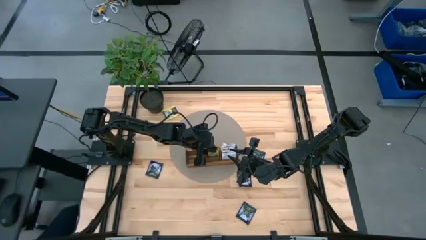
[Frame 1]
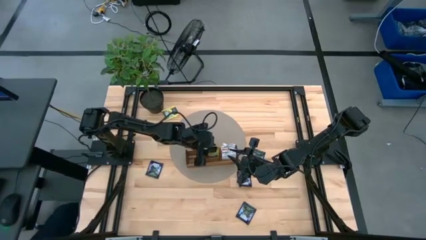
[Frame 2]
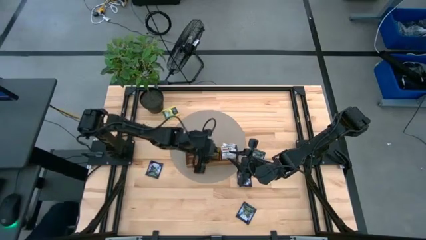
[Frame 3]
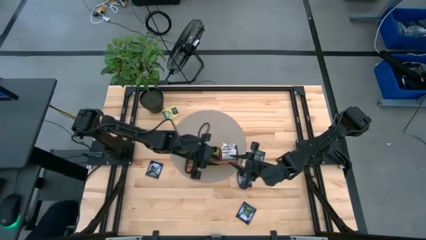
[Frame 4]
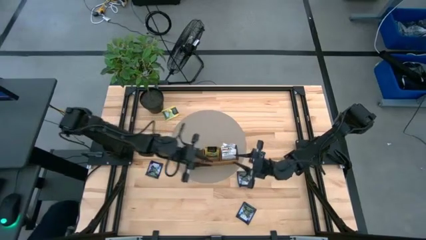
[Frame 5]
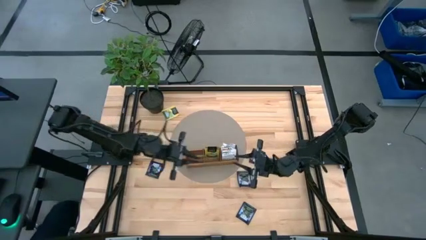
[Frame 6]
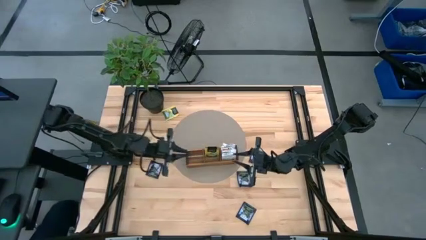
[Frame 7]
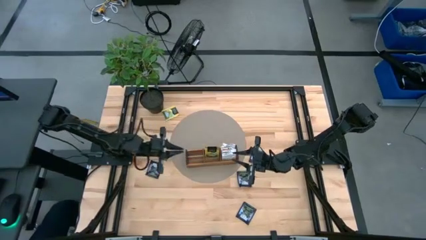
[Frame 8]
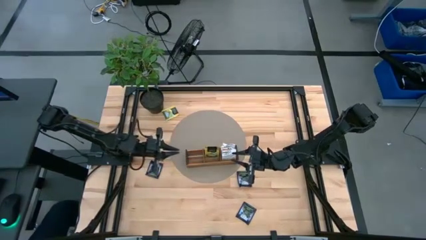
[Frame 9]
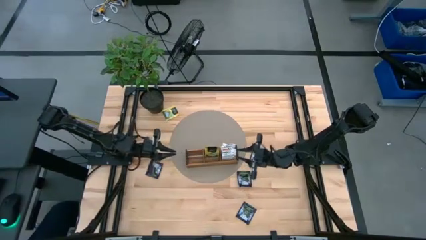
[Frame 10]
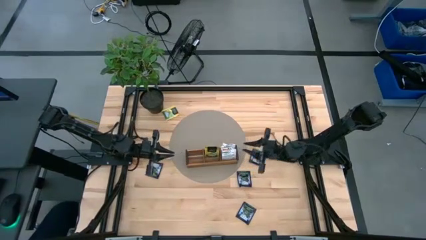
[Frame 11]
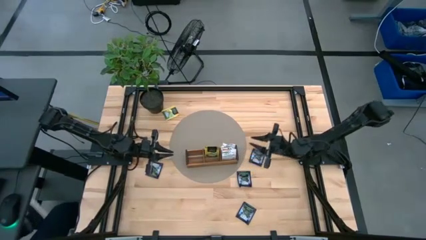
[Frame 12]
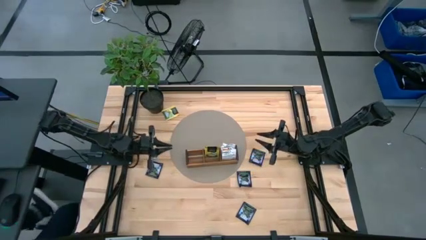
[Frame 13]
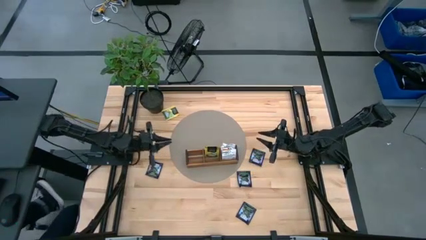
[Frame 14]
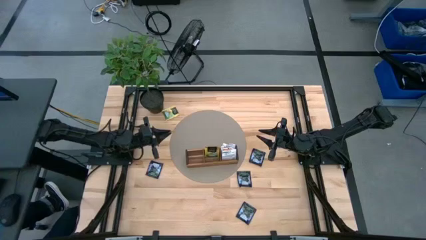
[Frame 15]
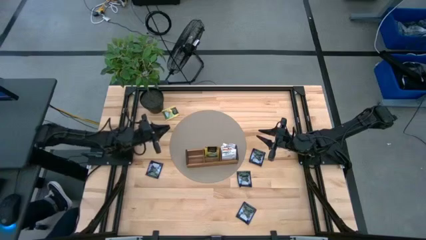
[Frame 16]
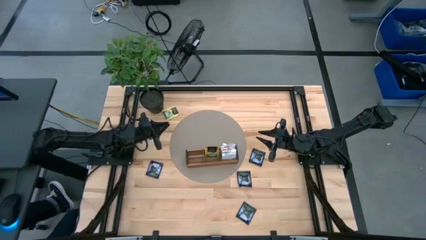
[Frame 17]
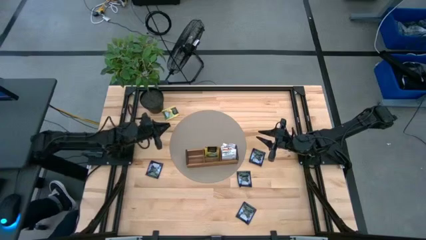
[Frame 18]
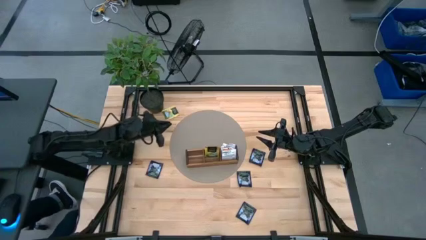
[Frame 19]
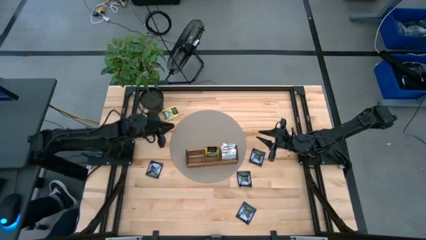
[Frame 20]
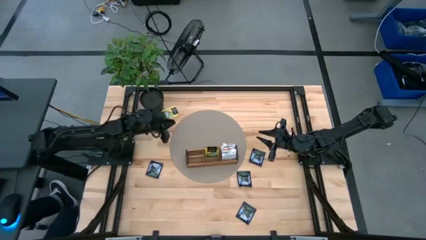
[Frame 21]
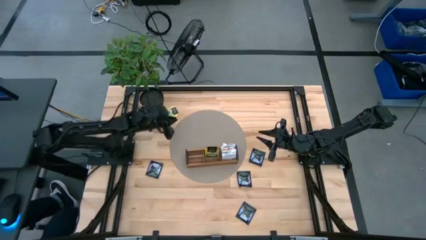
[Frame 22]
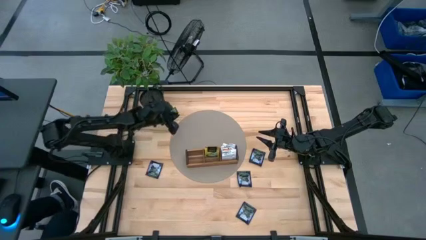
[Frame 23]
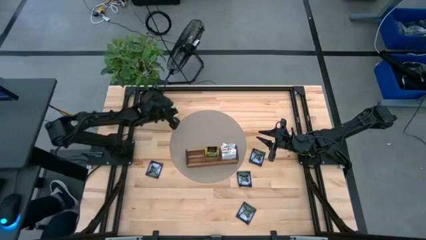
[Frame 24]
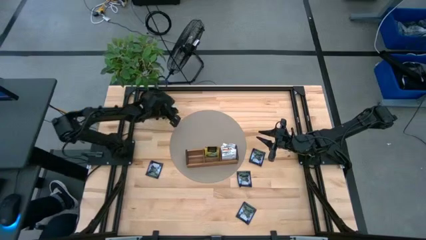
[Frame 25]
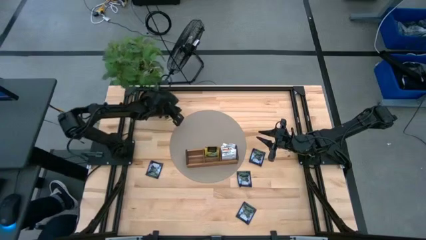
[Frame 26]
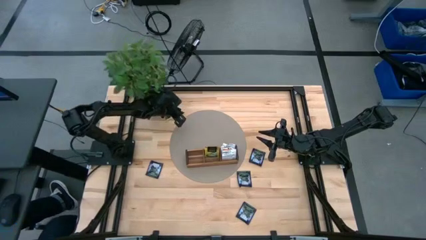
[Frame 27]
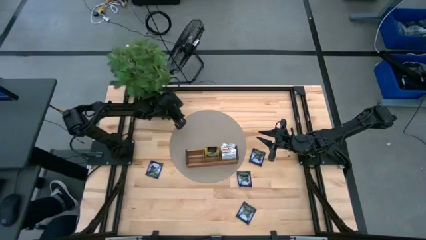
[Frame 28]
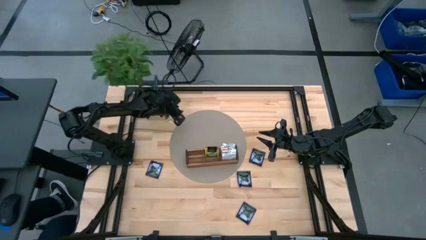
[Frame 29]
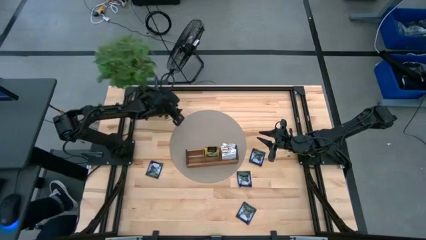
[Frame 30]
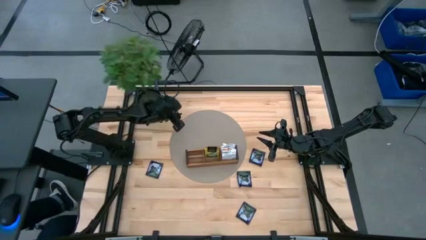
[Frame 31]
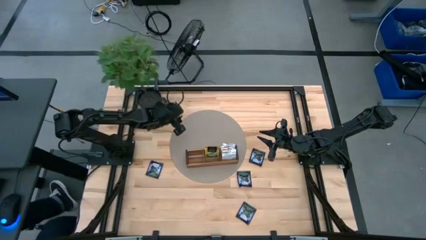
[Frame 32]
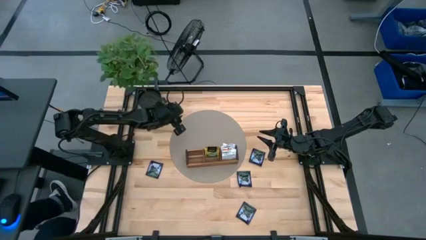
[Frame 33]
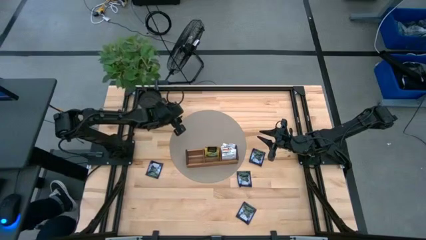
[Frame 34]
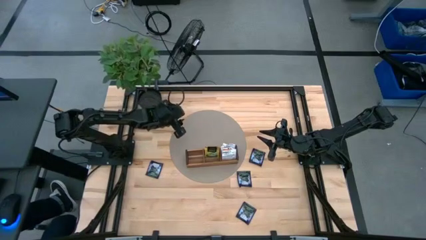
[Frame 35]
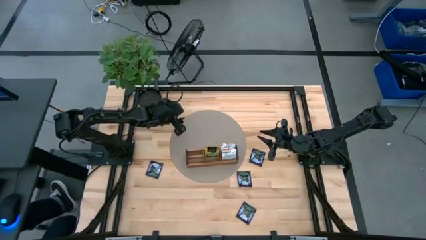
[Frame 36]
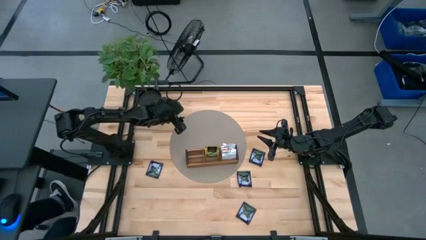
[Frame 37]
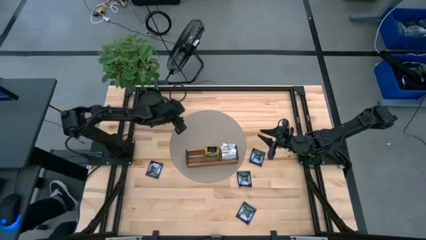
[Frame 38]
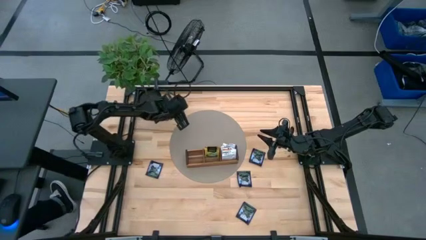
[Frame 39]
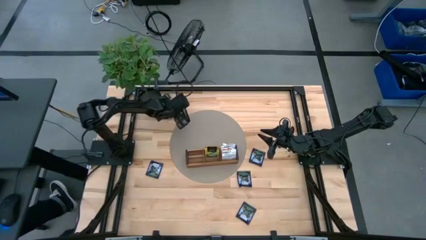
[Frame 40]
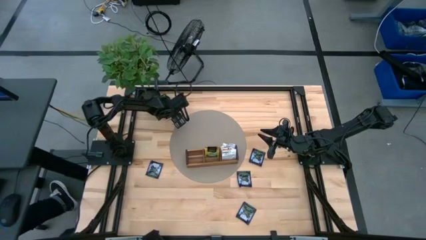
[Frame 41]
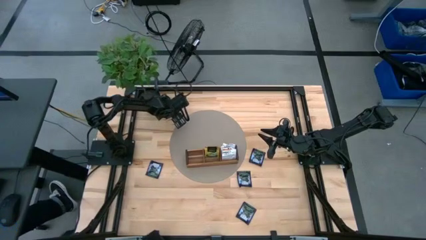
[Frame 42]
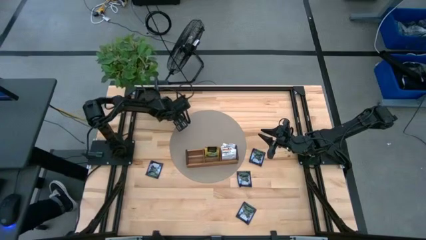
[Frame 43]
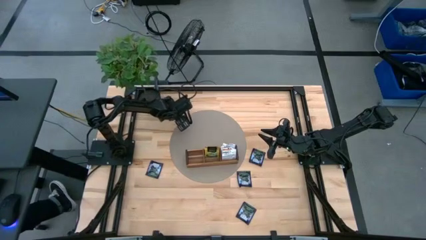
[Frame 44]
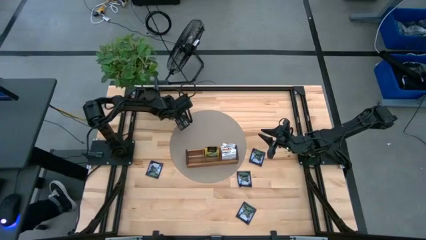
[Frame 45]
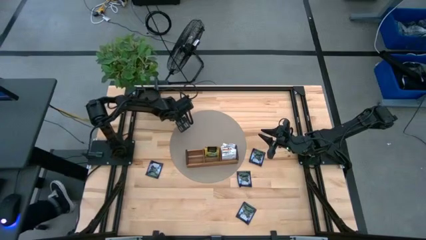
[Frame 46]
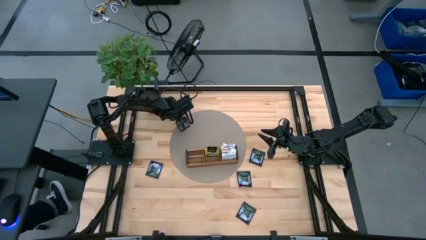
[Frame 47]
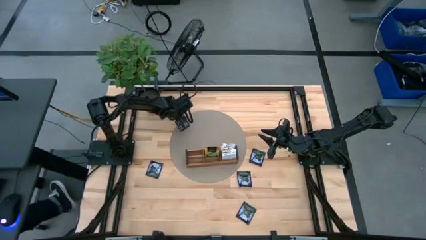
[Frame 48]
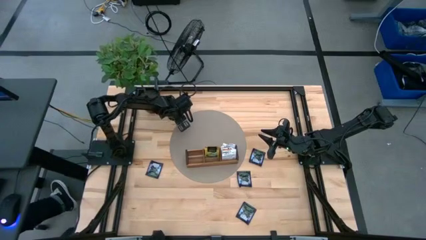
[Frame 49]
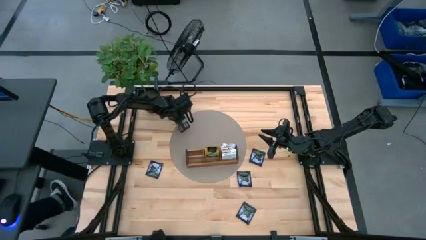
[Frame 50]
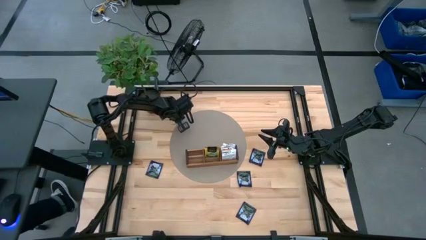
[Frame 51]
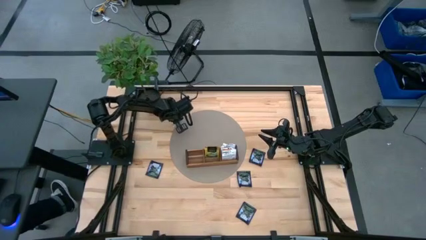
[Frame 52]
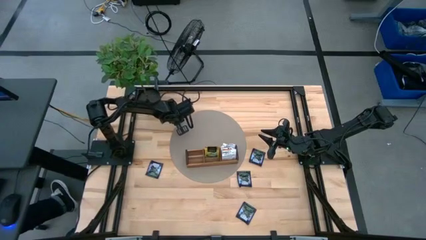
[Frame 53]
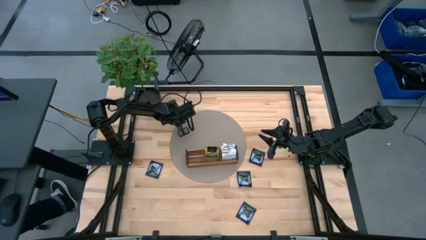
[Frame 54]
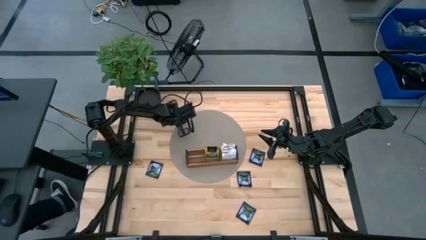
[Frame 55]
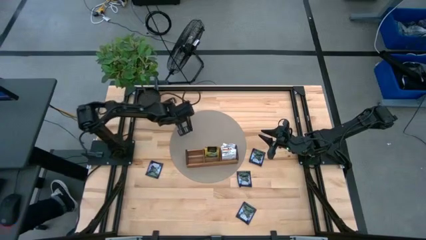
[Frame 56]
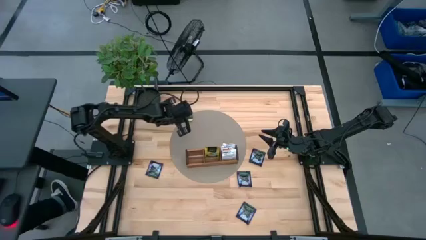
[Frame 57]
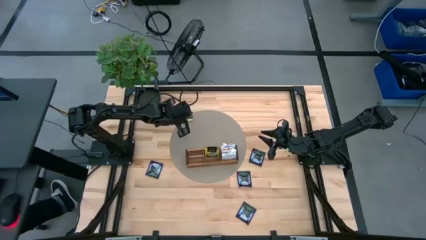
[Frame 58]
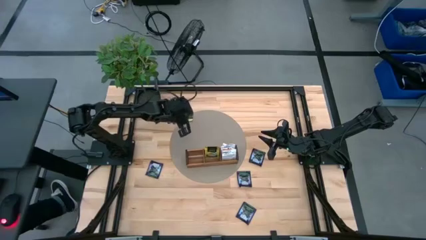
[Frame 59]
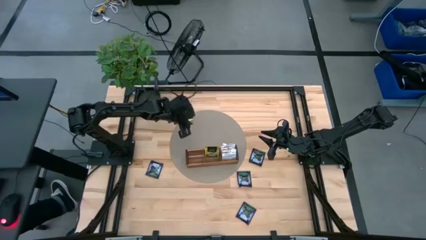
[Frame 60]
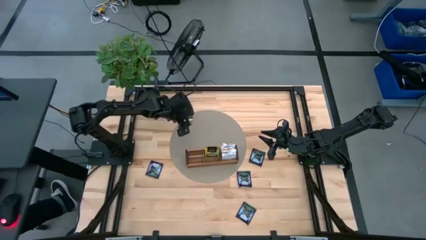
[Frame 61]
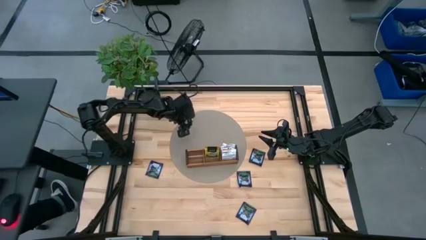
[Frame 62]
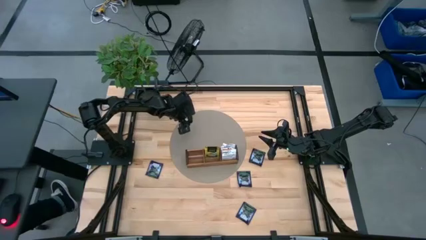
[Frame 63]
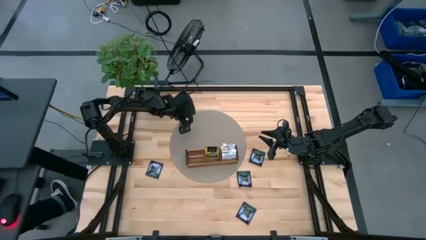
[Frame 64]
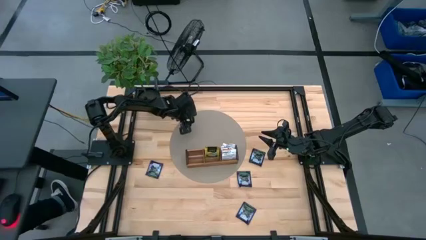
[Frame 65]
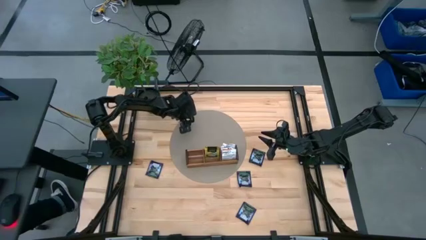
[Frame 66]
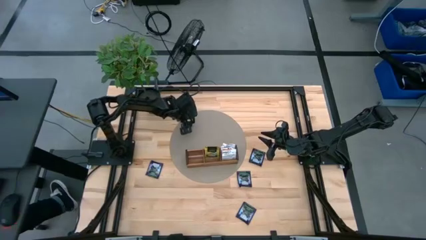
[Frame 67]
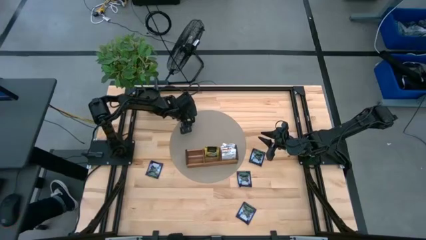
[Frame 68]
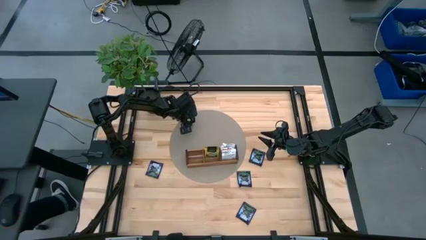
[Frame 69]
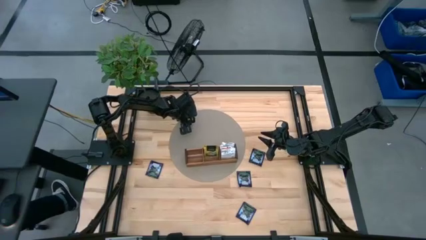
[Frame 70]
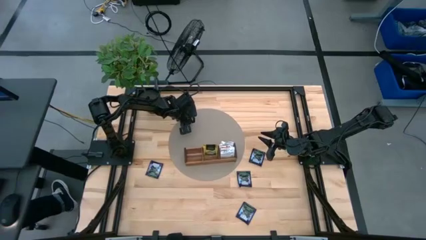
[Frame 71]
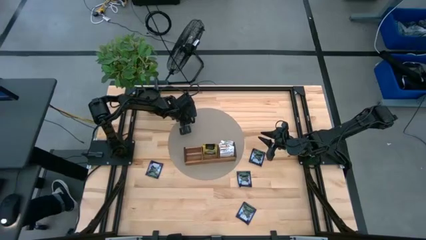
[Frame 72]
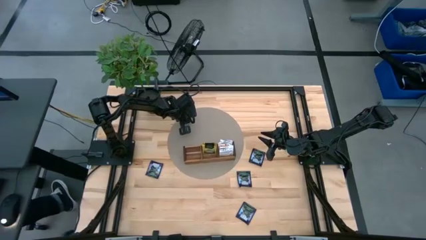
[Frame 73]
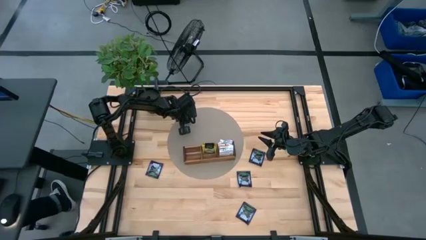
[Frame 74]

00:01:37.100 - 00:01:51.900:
Task: Pick & Place Tea
Put the yellow tea bag into the middle section of the wooden organizer

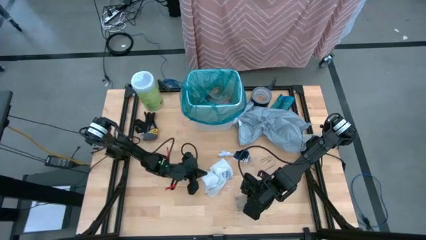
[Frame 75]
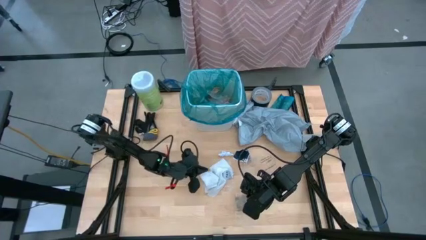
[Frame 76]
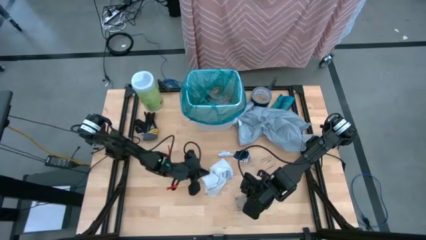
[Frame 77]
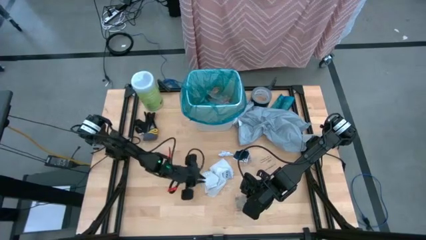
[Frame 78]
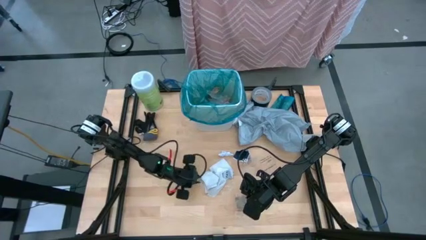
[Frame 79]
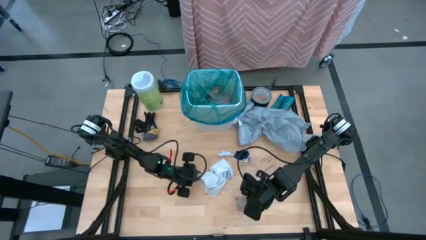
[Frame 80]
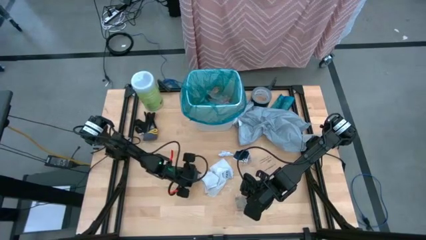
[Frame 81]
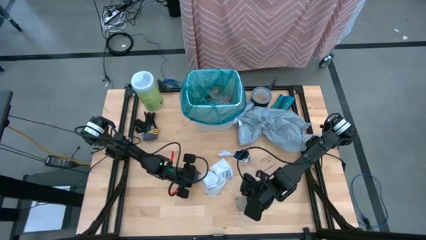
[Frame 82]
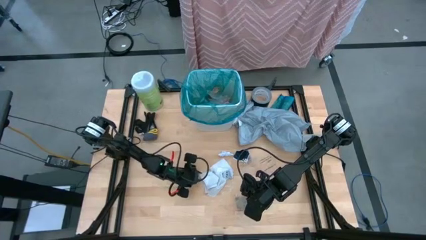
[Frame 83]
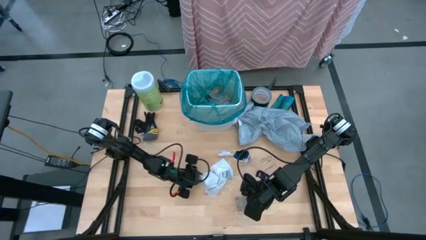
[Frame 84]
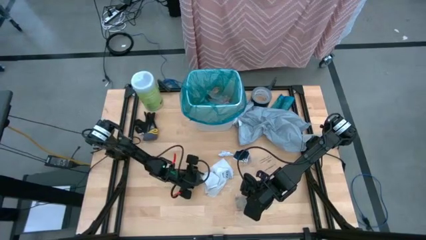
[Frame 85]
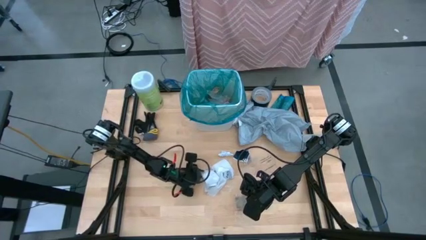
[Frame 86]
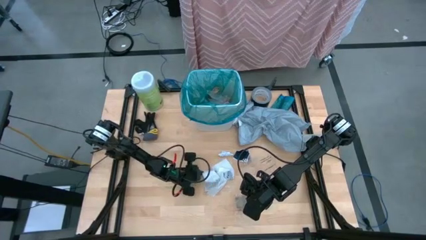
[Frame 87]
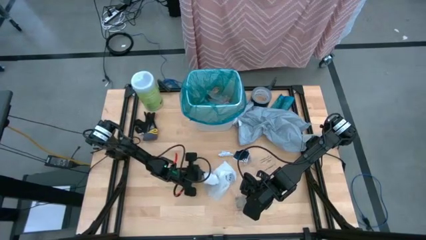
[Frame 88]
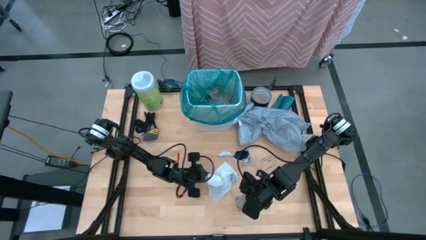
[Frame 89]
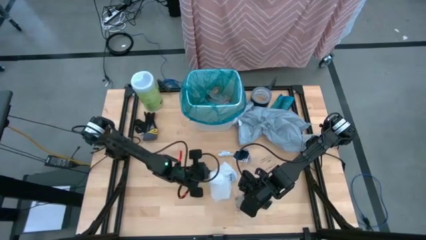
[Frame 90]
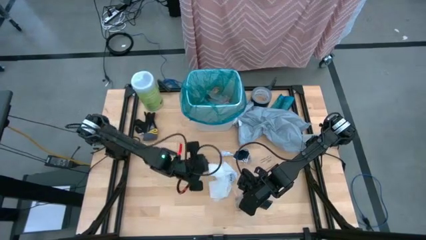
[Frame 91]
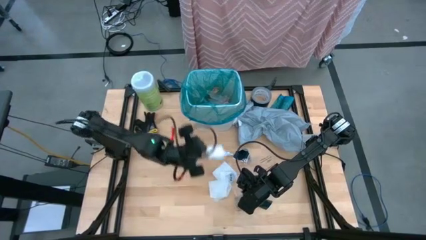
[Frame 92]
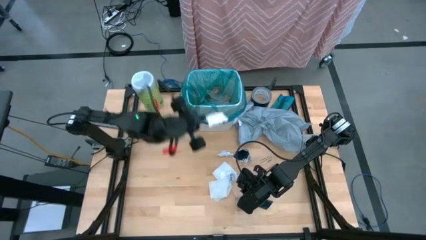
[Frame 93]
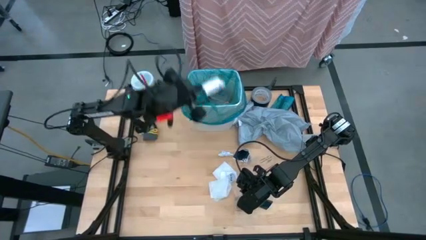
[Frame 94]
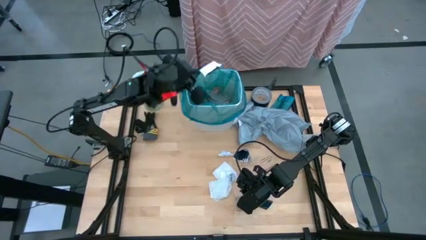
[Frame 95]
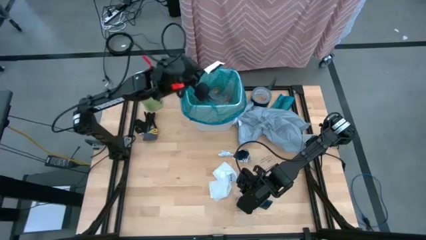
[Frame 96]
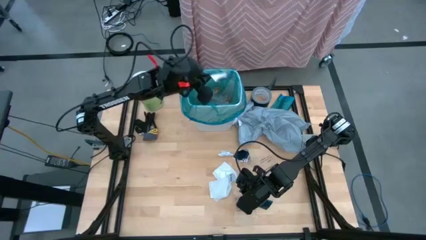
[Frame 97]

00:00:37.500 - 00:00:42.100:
Task: place trash/remove bag and relplace
Put the white paper into the trash bin
